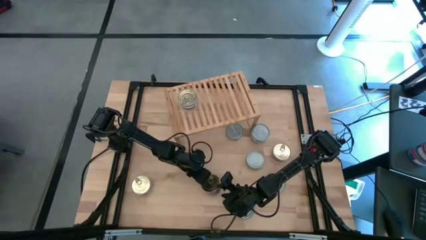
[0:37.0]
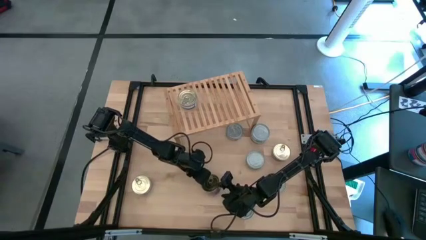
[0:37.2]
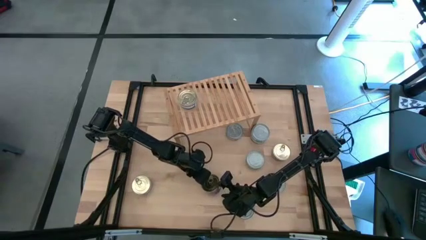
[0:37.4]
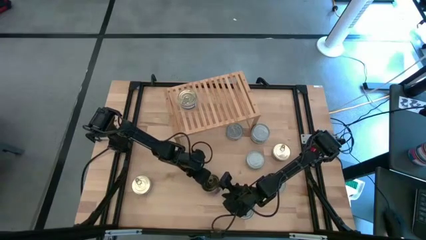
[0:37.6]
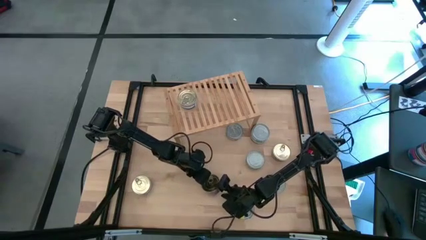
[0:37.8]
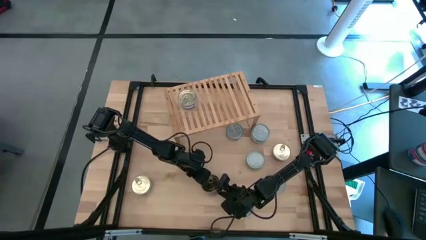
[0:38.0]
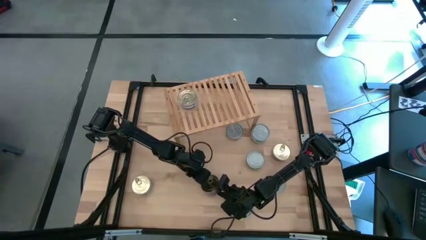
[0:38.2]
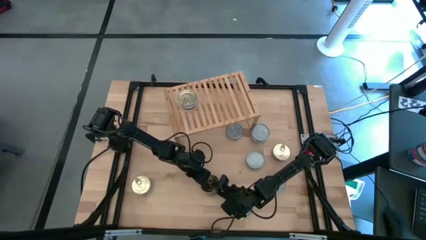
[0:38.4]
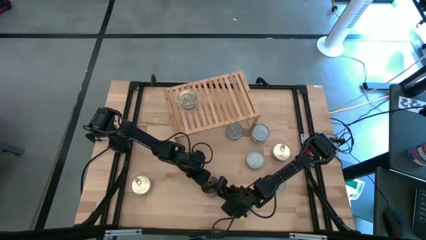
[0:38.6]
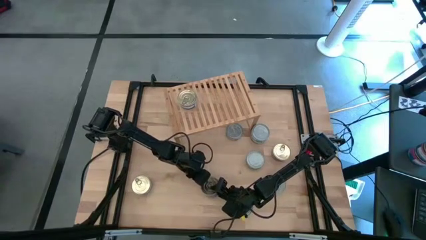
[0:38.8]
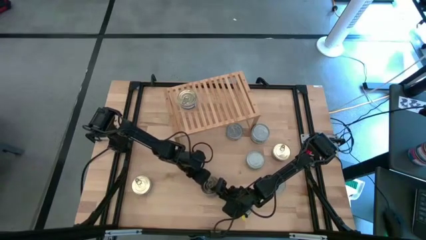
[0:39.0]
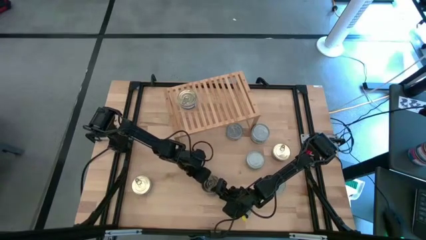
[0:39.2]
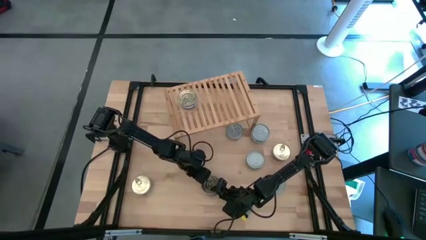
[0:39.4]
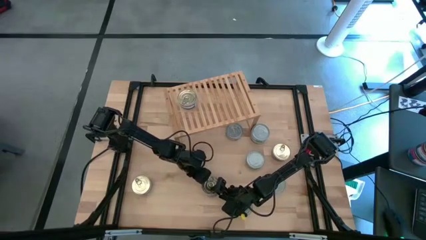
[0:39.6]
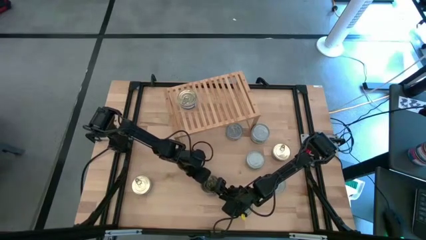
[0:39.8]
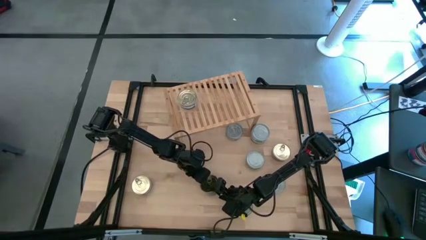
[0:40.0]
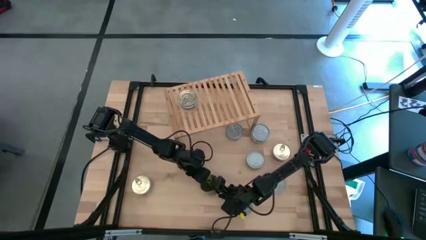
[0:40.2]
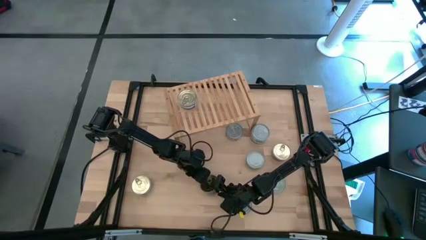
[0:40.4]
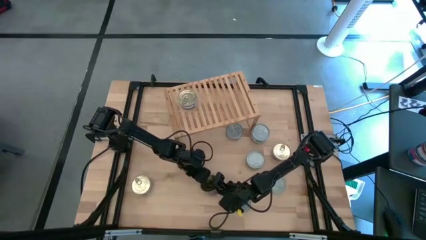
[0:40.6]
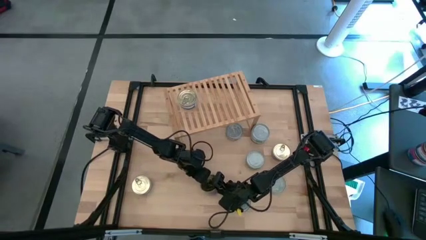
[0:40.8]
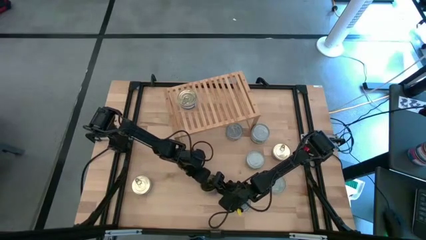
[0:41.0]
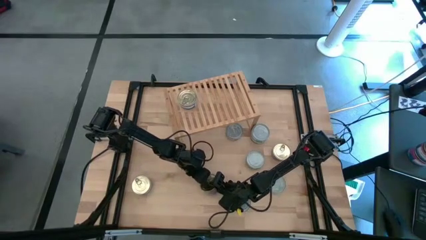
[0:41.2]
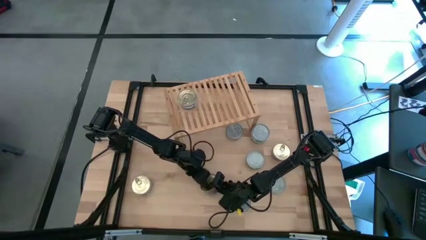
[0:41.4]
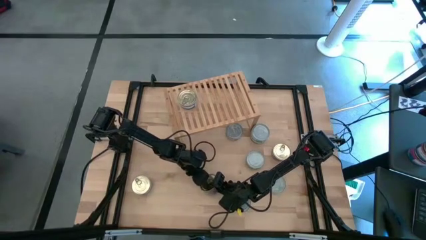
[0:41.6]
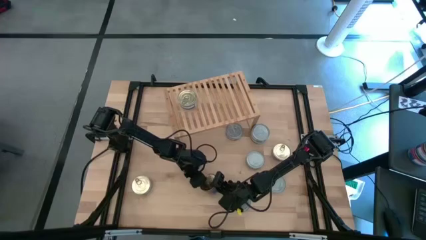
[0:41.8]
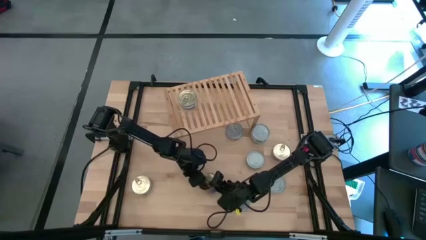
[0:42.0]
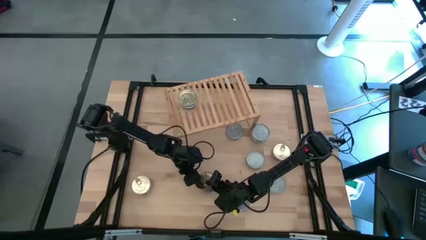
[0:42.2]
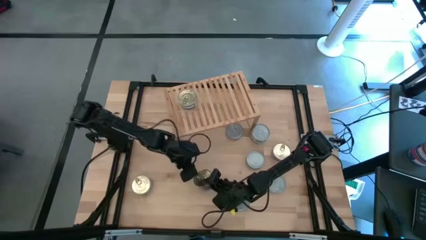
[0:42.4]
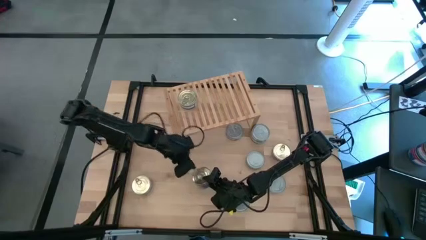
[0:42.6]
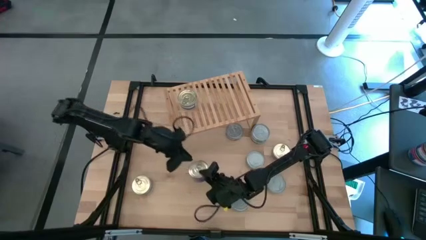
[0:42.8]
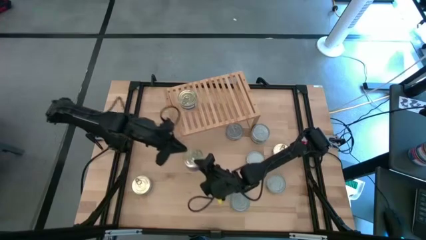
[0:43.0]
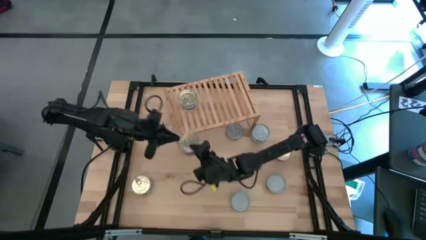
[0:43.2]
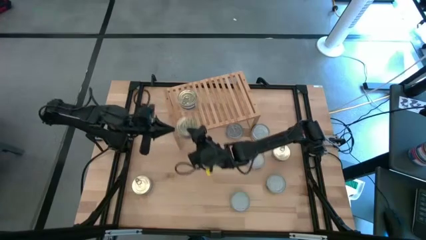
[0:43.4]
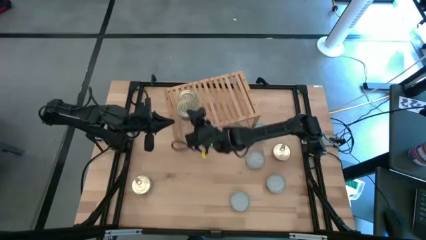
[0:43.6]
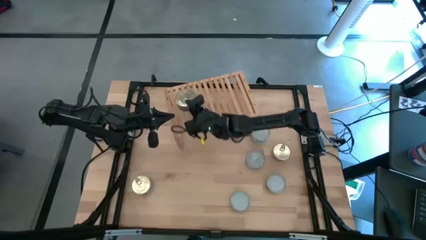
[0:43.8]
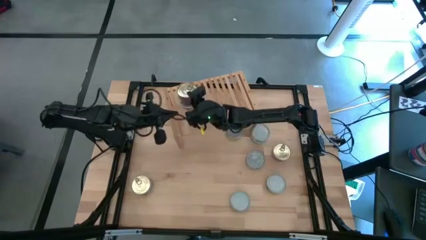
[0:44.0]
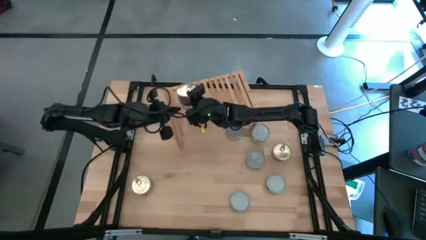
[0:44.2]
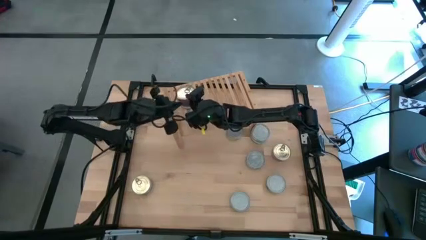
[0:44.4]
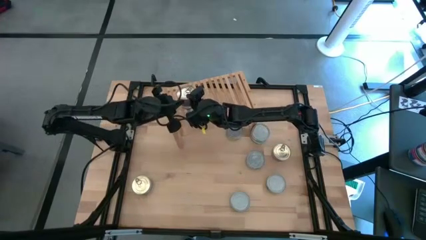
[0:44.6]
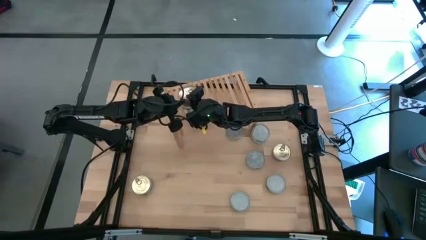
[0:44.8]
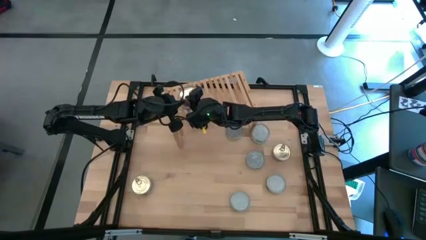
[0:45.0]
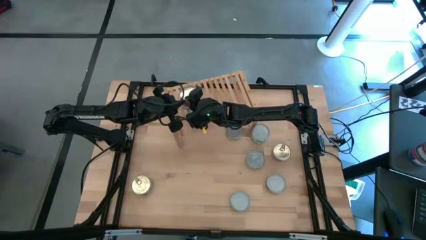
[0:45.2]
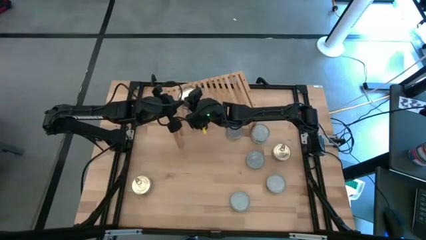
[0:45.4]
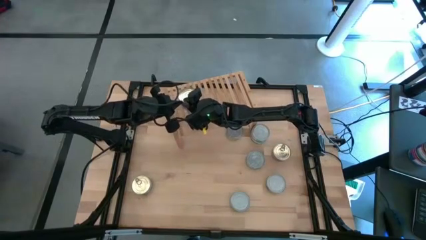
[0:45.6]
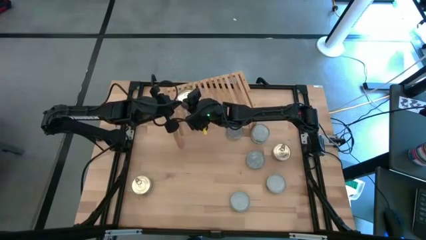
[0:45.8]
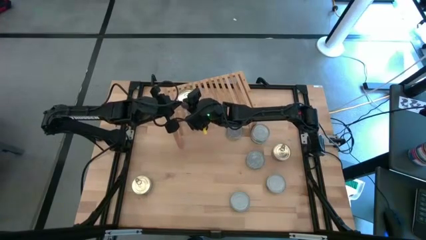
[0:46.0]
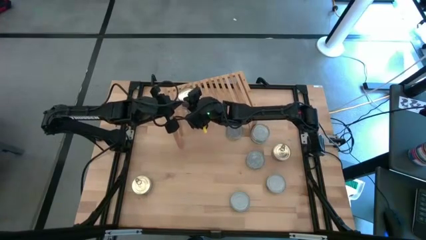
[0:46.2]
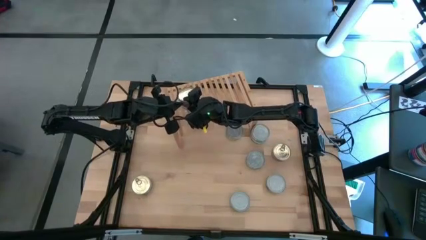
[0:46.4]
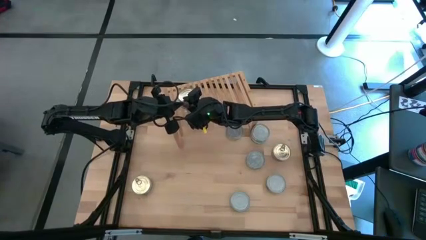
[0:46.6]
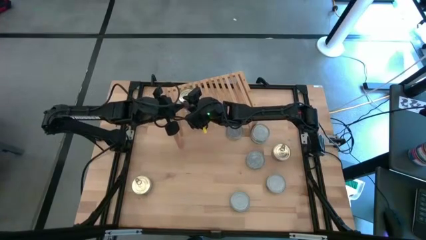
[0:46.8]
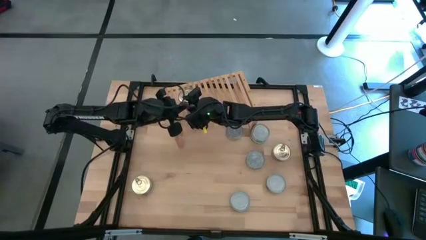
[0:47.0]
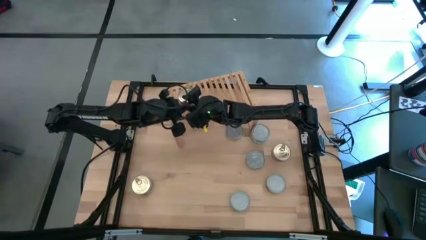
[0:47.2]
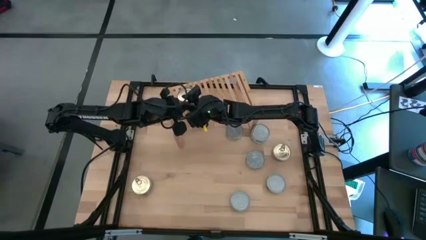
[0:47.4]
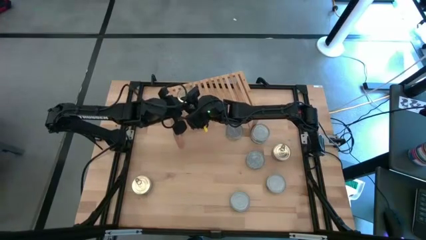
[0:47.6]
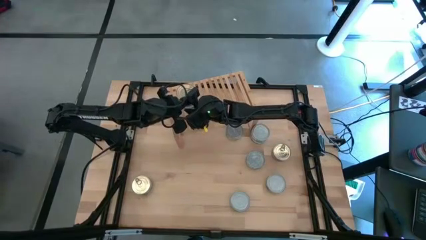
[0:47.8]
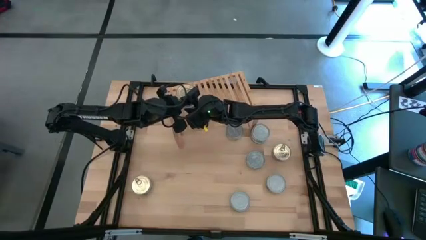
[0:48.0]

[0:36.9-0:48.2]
Task: Stack canned seafood by type on shelf
Stack the blue tuna can on top of the blue tuna can on the shelf
